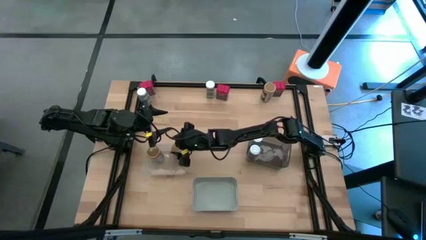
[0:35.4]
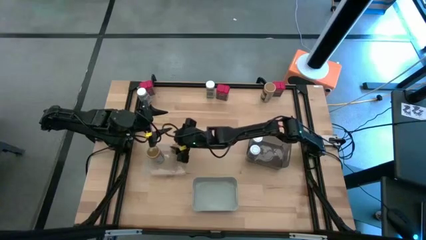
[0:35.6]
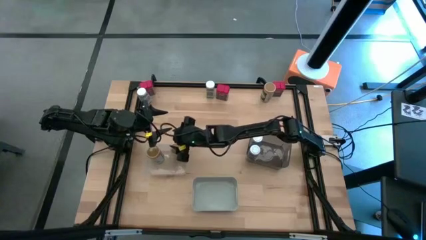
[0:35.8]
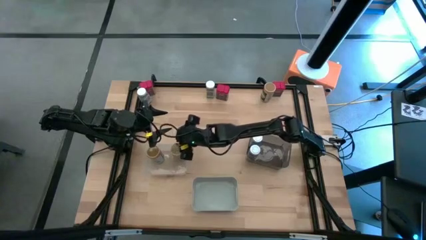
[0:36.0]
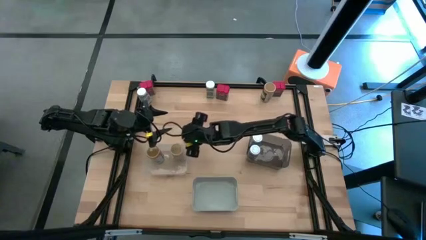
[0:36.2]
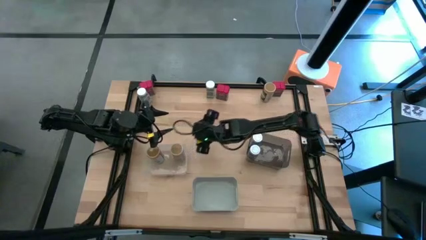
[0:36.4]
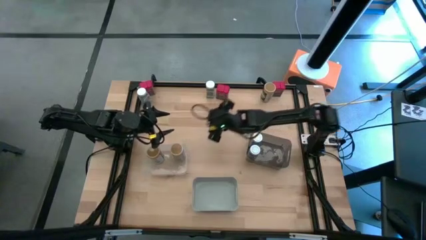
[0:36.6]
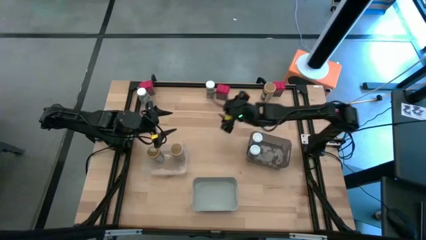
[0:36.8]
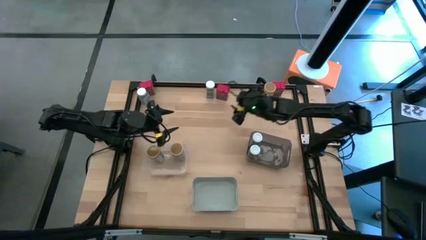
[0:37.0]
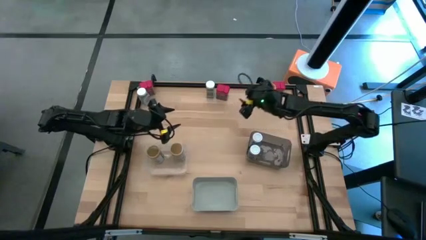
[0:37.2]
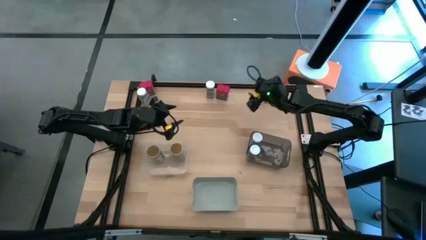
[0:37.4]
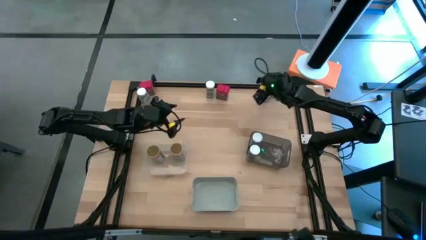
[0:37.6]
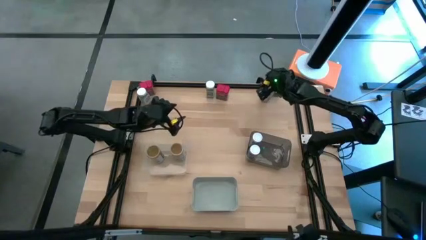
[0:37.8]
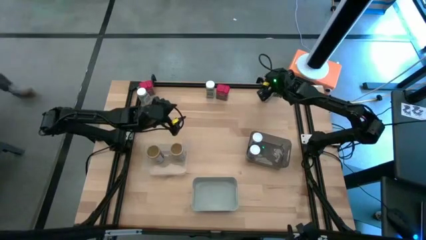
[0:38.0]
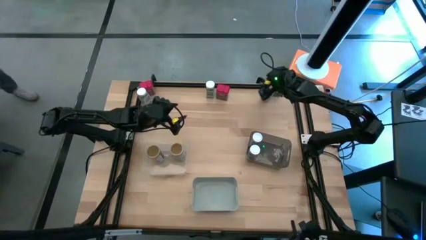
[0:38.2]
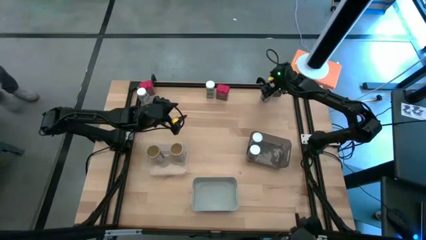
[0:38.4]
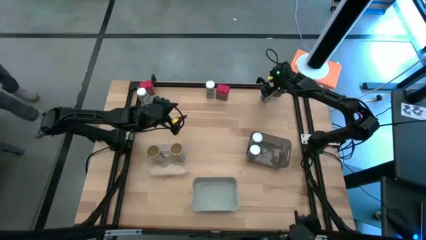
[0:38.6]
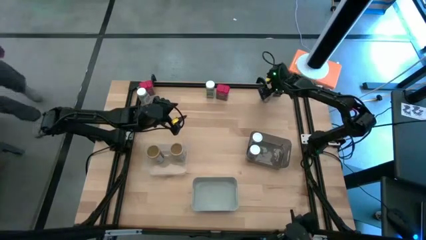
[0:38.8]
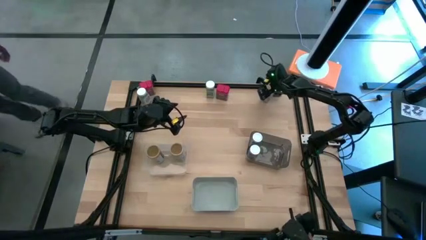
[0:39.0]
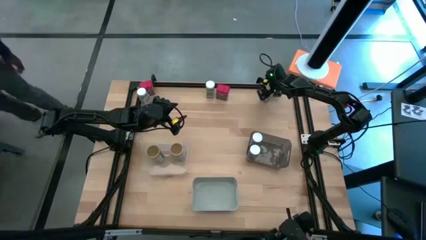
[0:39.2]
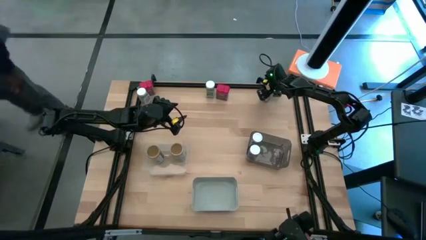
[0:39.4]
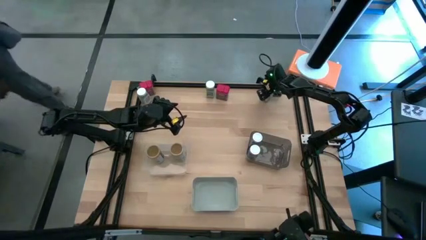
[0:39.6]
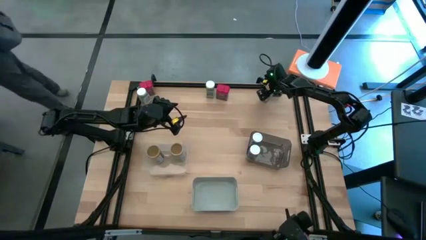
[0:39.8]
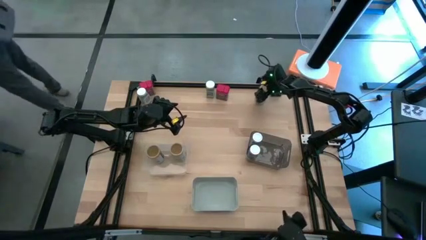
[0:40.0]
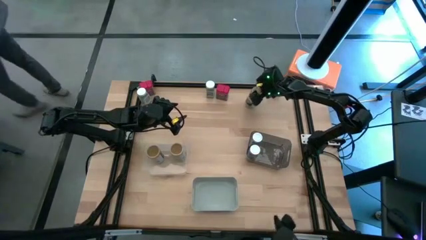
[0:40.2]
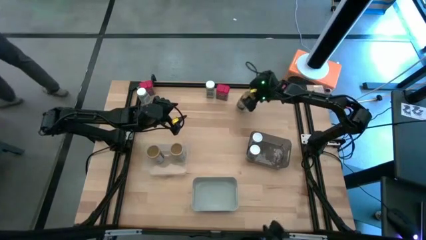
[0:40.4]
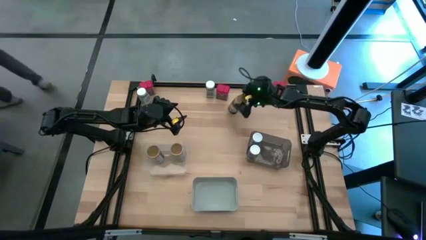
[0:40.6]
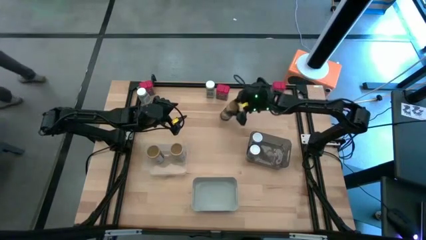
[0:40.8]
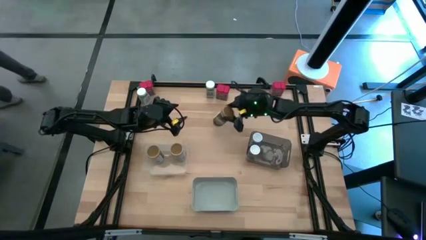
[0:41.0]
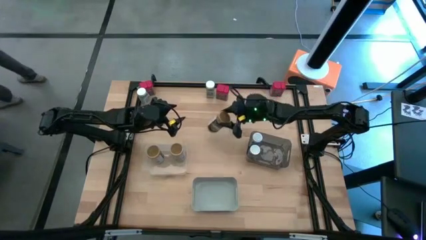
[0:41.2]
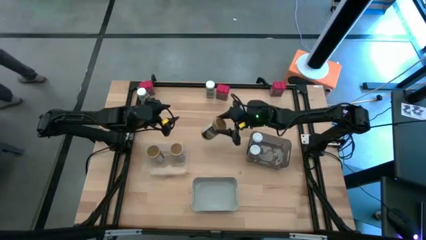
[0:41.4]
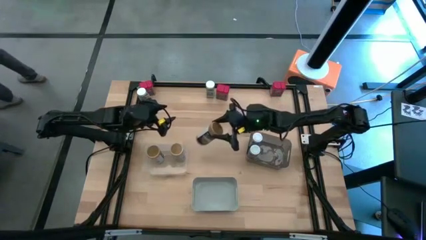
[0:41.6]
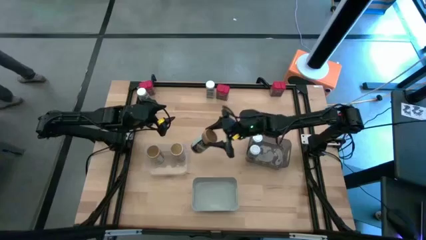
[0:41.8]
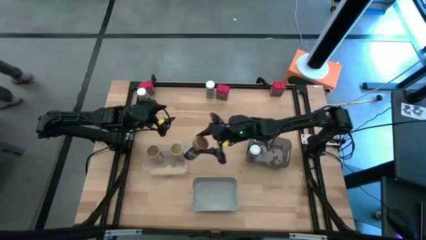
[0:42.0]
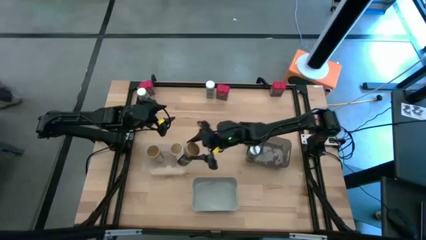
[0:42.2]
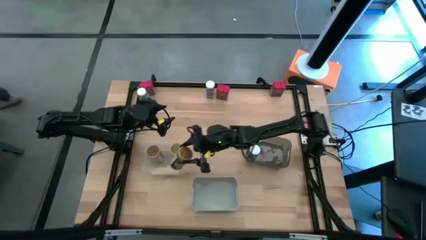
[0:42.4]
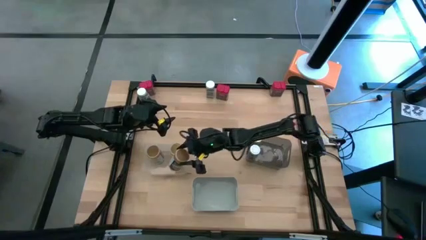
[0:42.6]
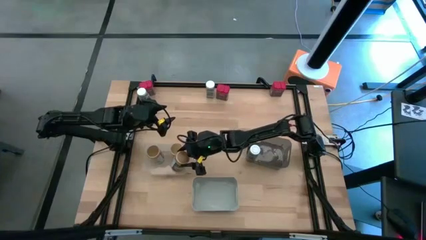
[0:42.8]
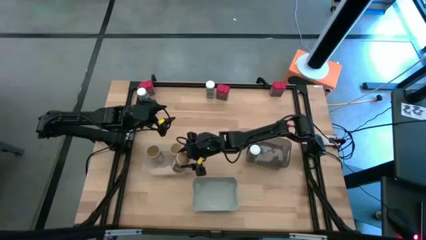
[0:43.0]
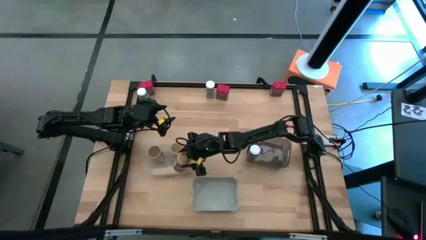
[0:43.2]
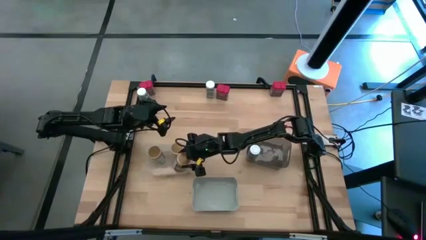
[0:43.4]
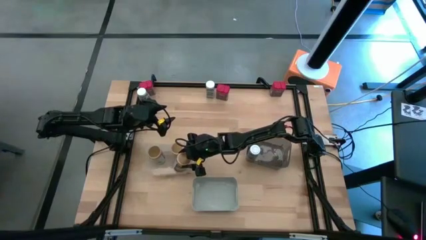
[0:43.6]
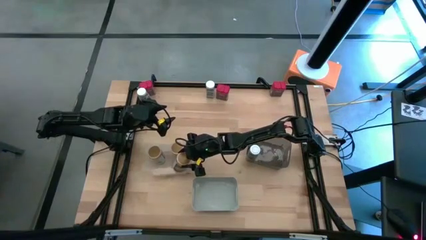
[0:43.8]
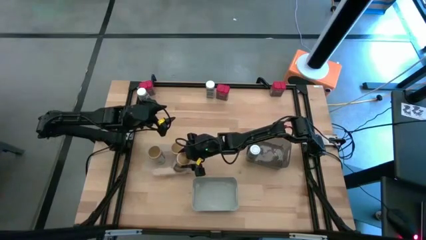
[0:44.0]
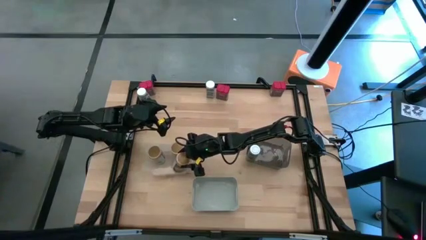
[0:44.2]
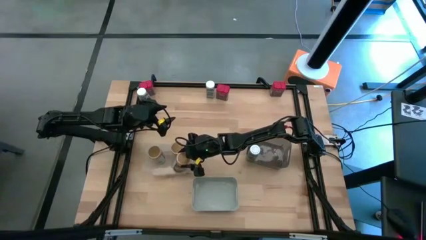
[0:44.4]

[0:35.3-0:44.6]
Task: Sort spices by type
Put the gold seasoning bottle into the transparent bin

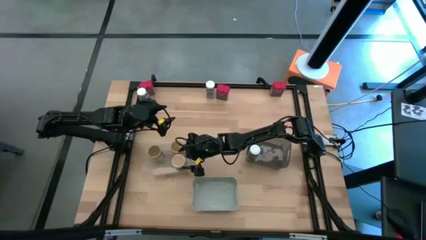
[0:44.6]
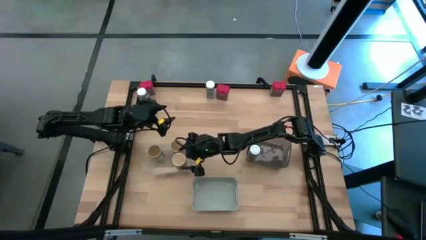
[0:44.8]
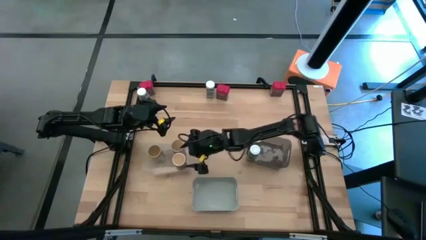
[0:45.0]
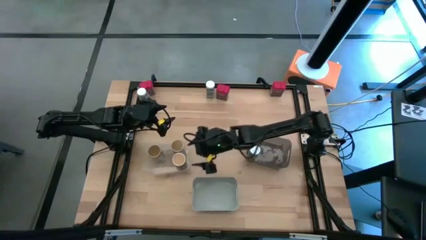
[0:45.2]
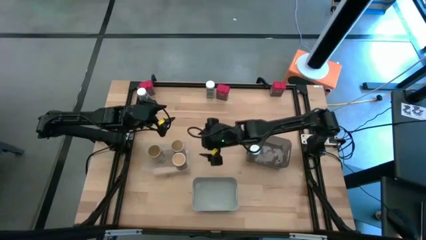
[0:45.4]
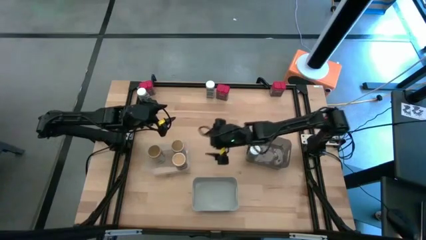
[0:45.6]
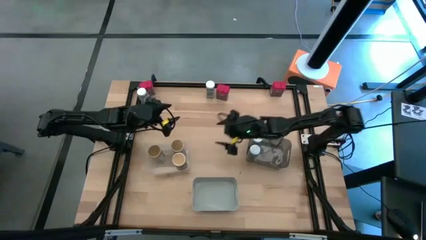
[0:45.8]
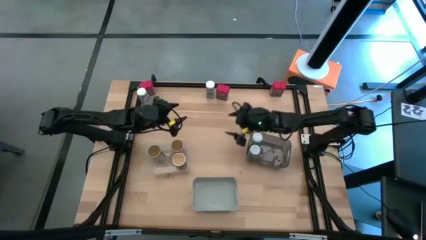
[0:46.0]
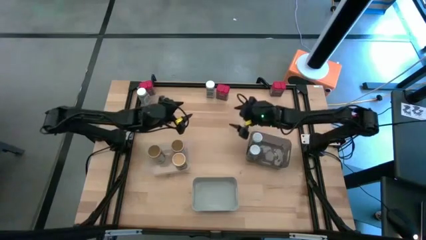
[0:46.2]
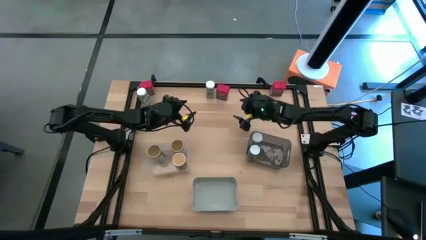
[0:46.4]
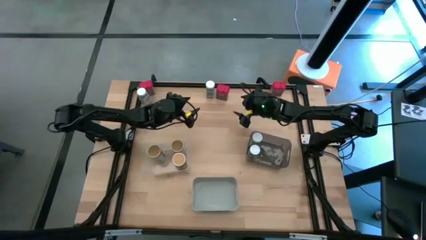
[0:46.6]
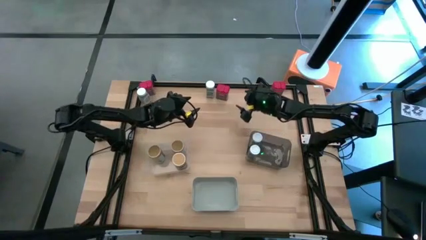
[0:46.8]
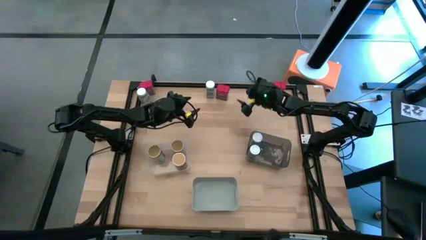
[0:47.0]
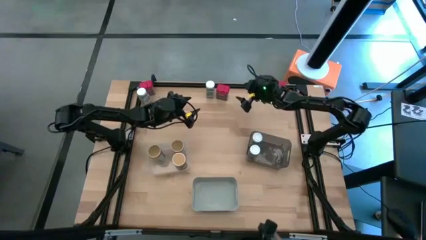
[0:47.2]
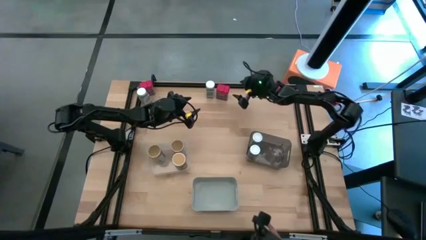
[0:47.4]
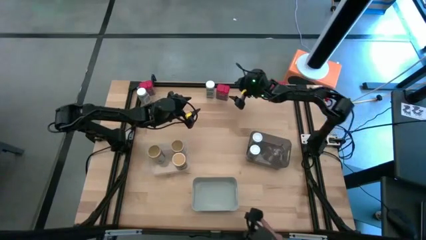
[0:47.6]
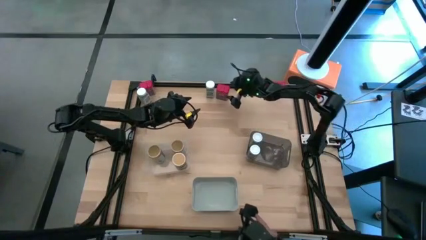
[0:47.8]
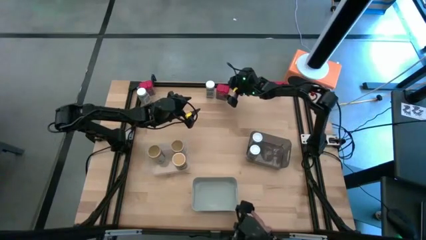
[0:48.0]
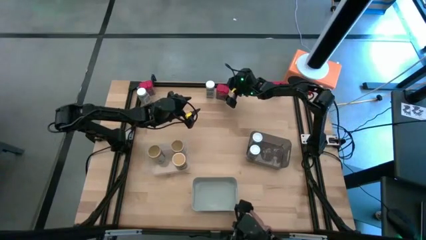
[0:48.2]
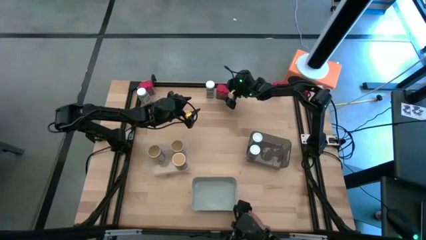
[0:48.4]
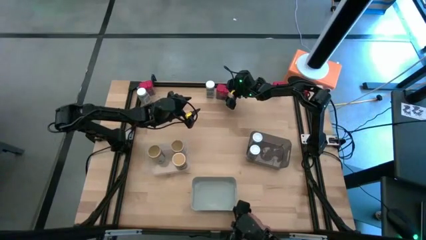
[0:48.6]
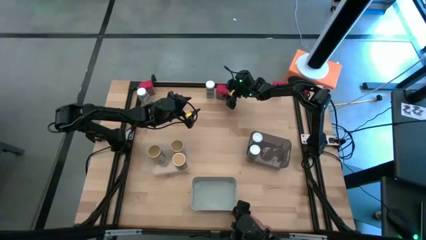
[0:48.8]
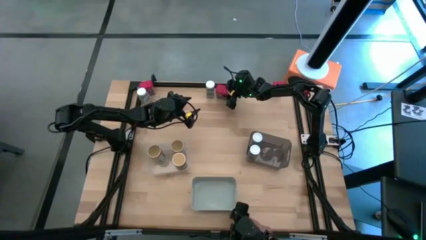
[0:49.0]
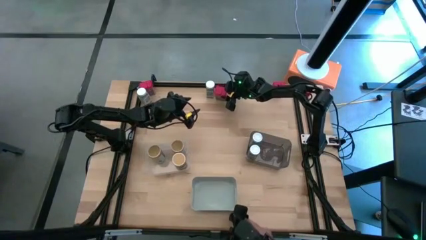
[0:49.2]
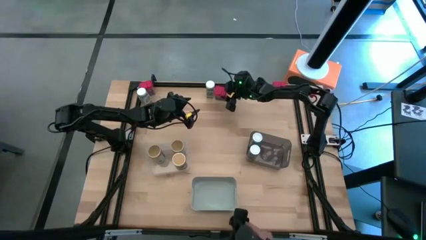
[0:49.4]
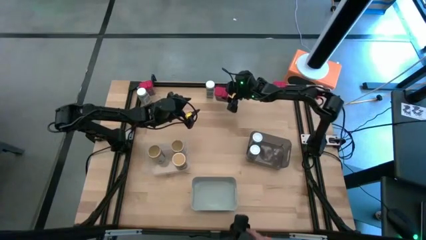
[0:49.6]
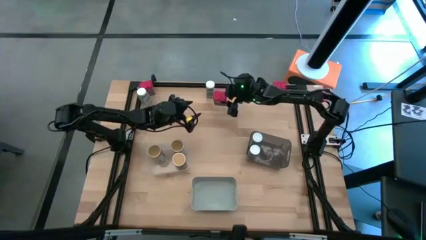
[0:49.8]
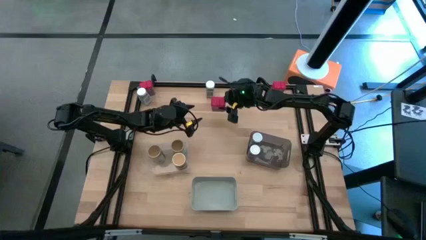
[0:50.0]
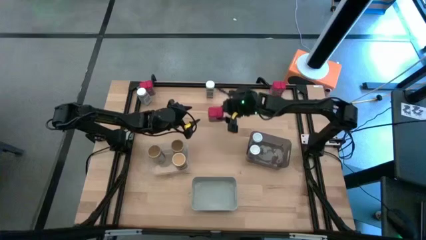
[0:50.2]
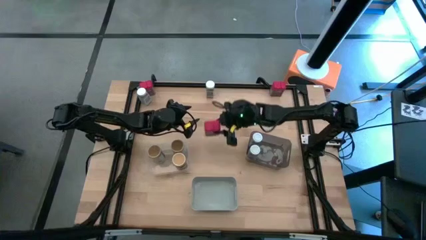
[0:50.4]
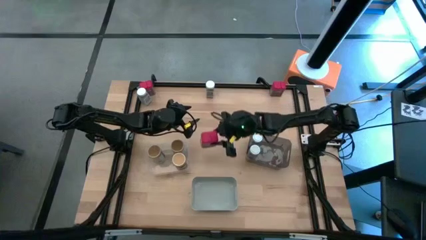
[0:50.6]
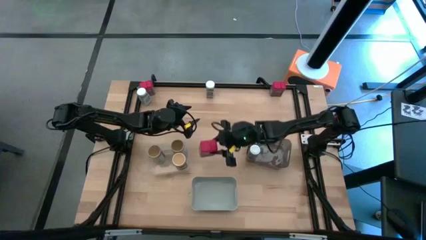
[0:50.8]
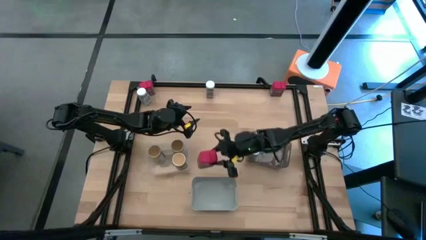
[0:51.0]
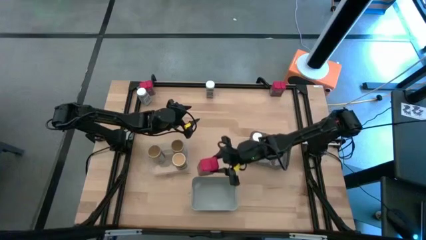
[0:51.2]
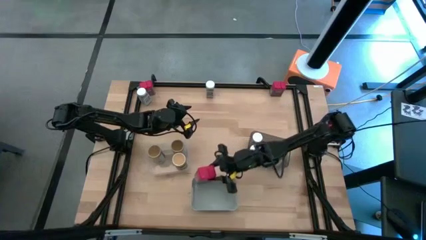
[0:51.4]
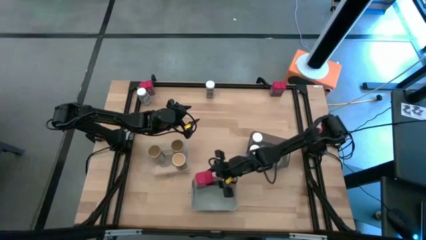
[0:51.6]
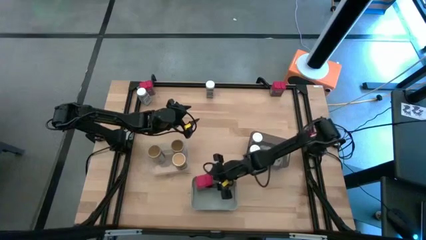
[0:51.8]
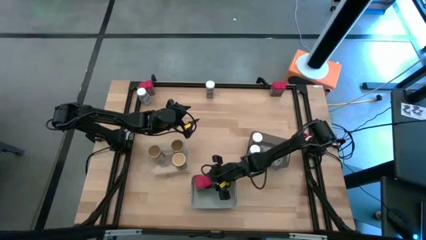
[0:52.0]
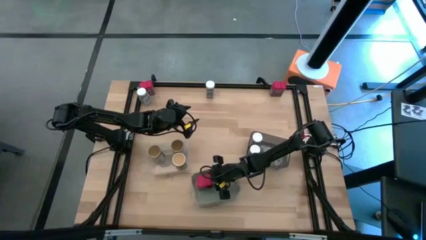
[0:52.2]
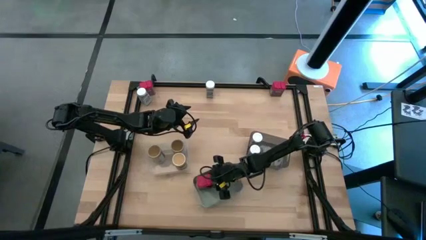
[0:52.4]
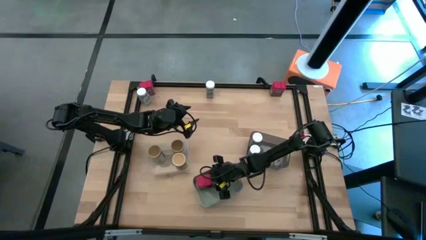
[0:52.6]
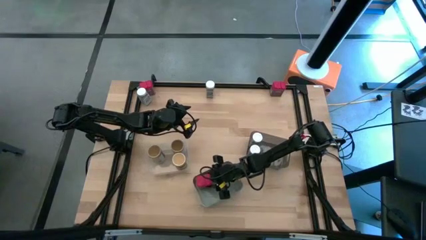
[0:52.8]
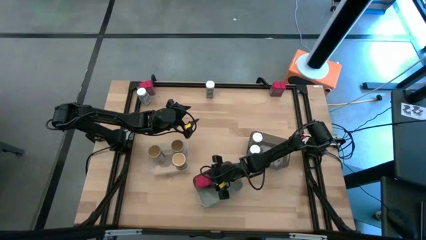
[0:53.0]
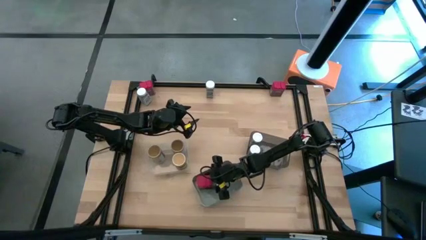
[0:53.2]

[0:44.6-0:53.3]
Put the red seasoning can into the gray bin
